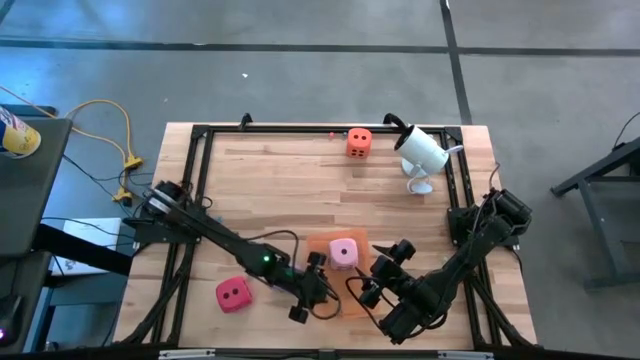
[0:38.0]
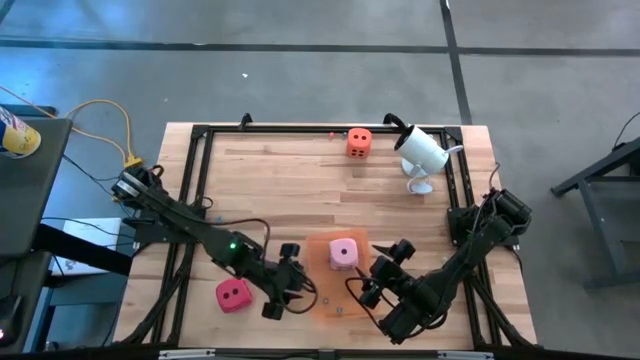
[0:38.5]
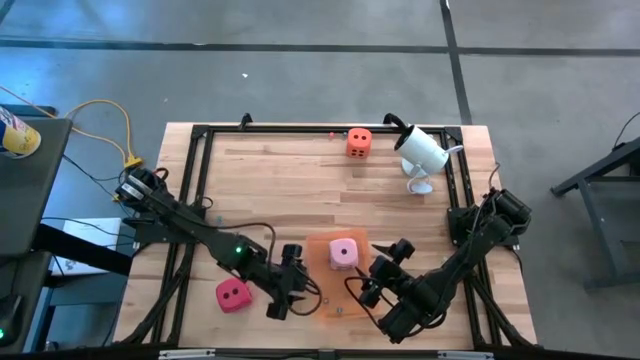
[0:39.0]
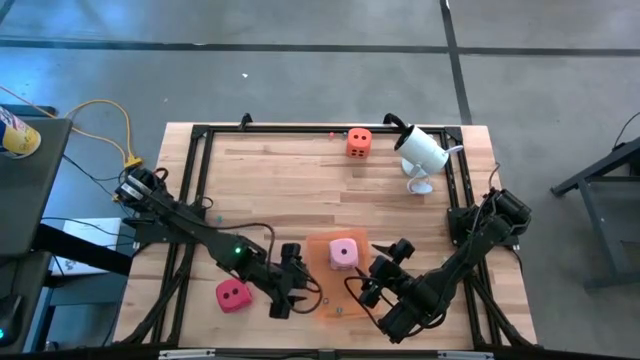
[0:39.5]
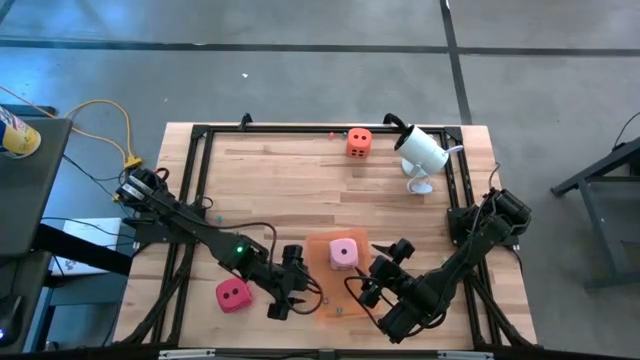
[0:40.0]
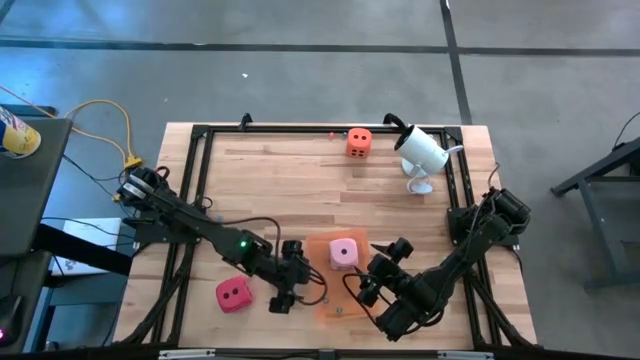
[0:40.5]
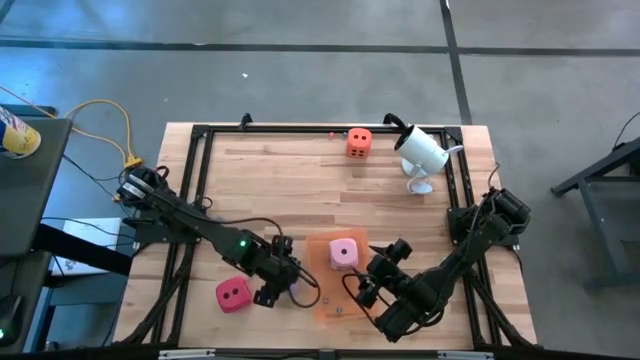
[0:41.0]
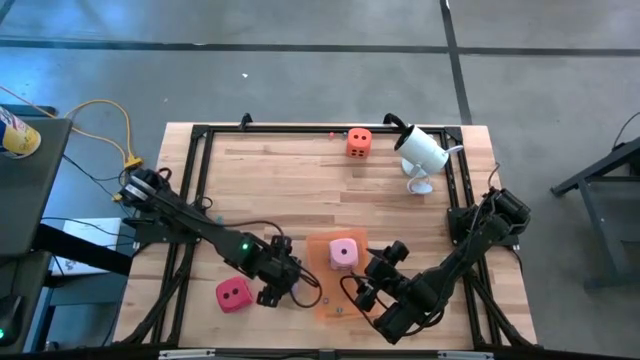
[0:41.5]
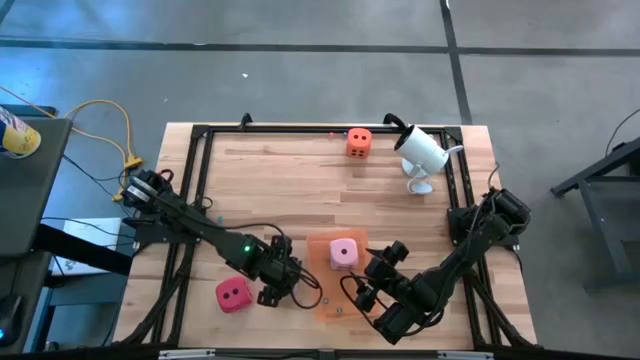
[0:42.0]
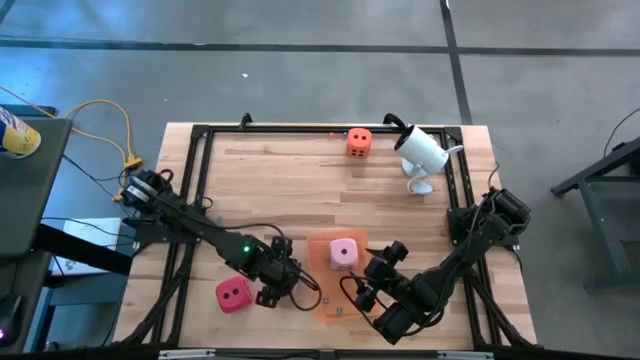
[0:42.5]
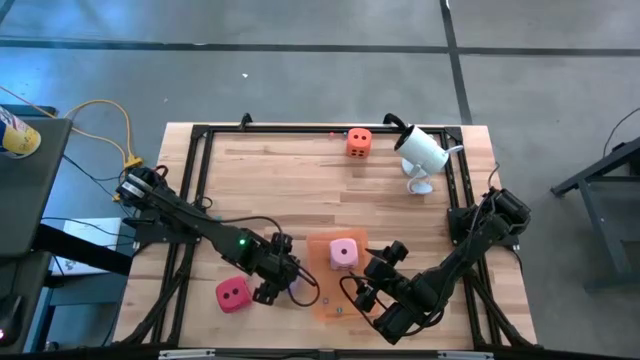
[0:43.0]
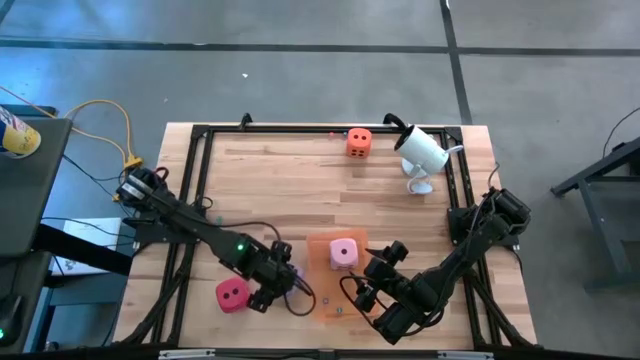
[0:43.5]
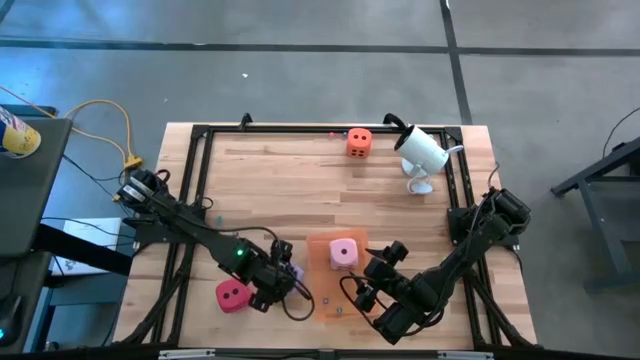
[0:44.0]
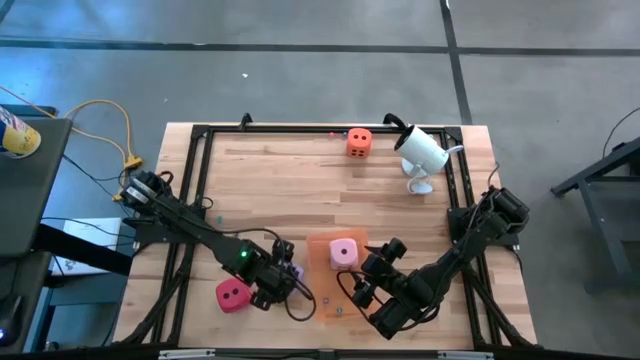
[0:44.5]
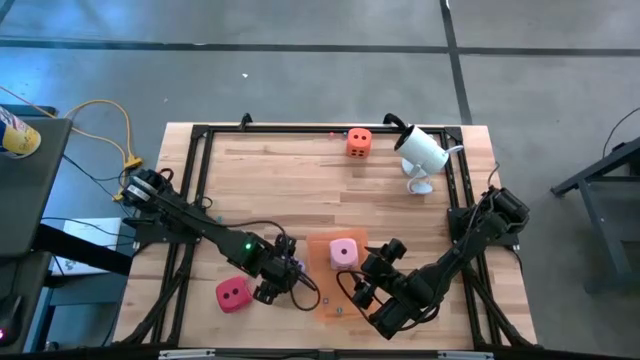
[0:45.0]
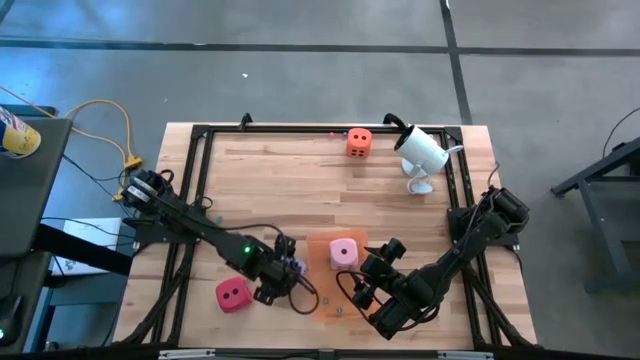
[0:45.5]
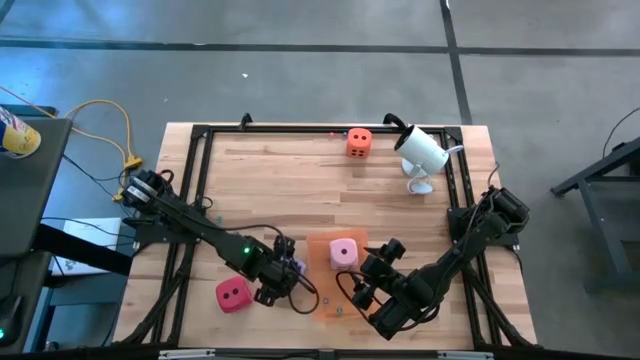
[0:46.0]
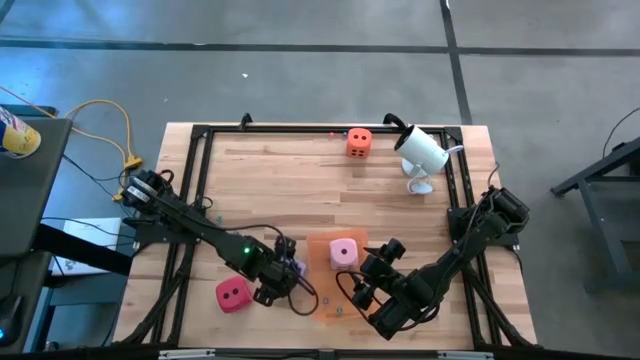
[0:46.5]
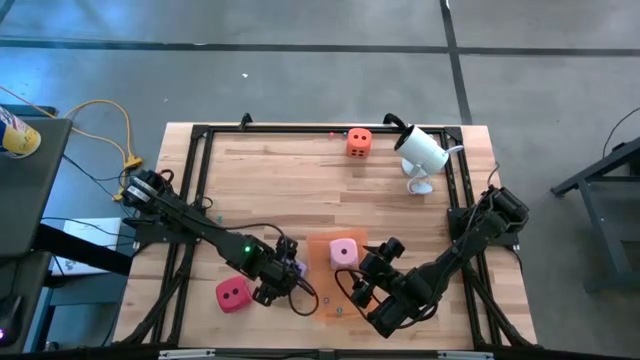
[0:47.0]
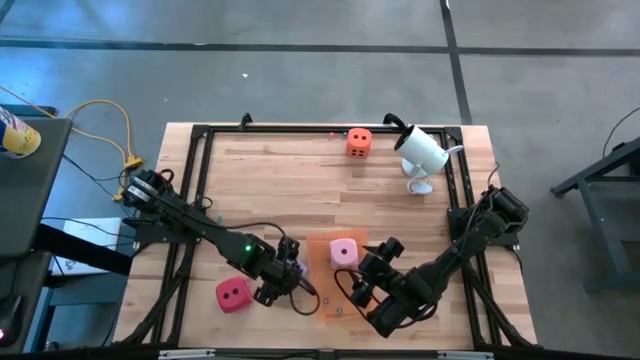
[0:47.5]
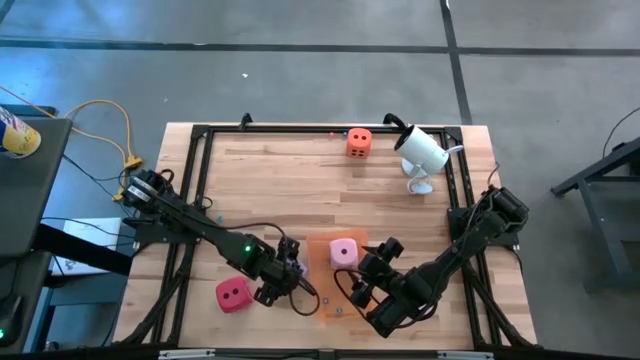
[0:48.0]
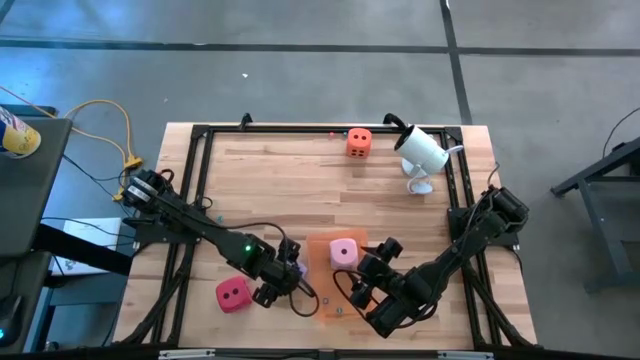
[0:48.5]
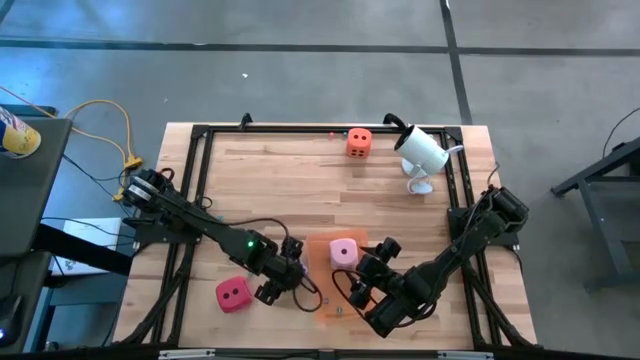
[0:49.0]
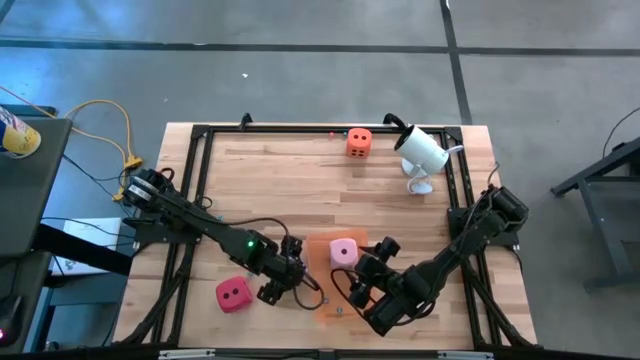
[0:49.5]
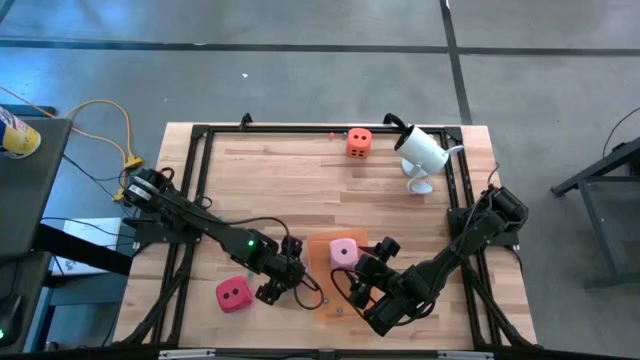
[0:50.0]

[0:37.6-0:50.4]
Task: Pick & Place Dice
Put the large purple dice into the orange bin

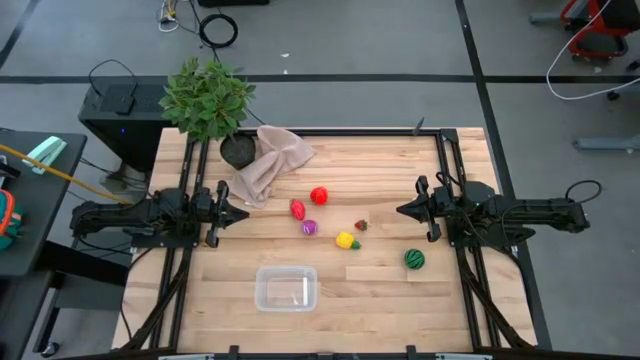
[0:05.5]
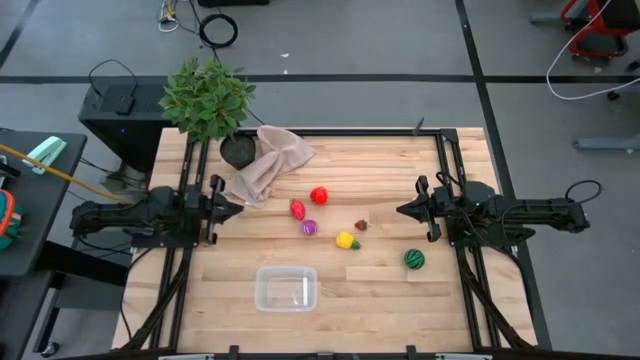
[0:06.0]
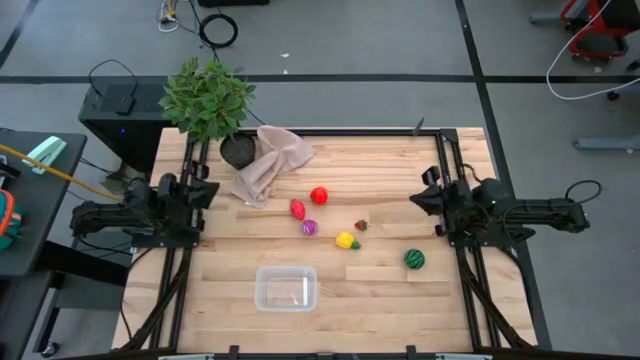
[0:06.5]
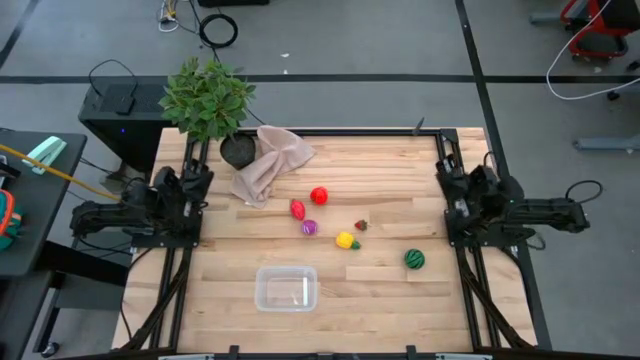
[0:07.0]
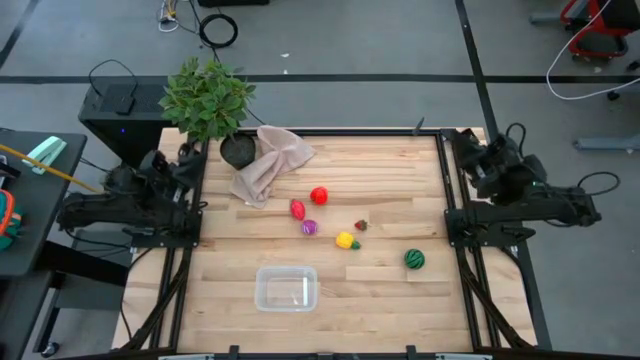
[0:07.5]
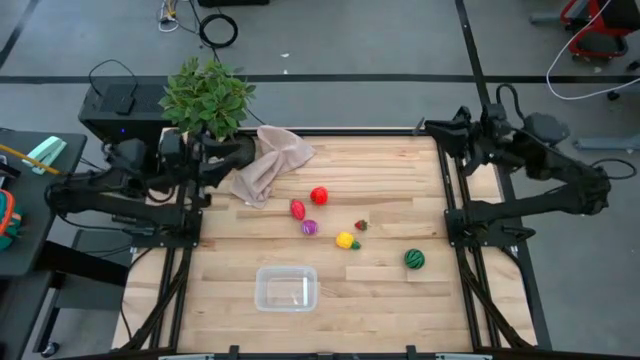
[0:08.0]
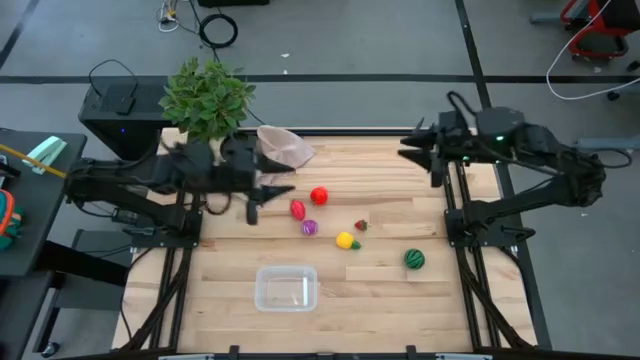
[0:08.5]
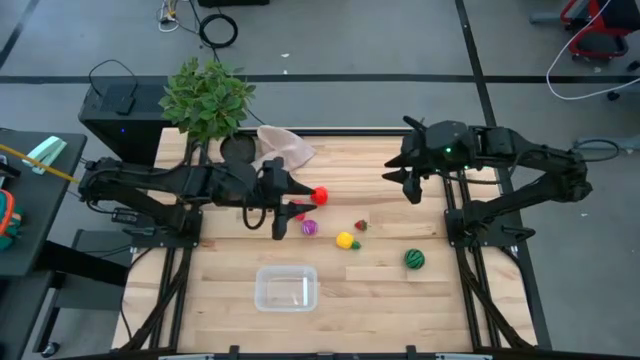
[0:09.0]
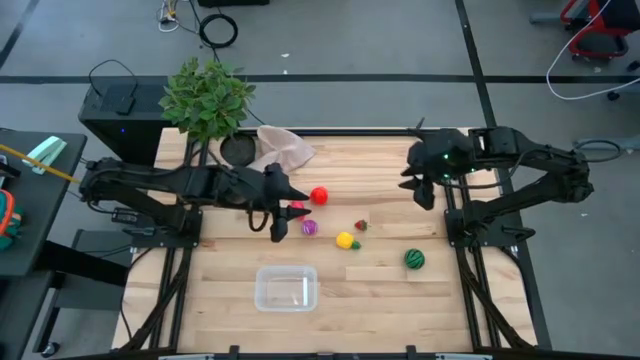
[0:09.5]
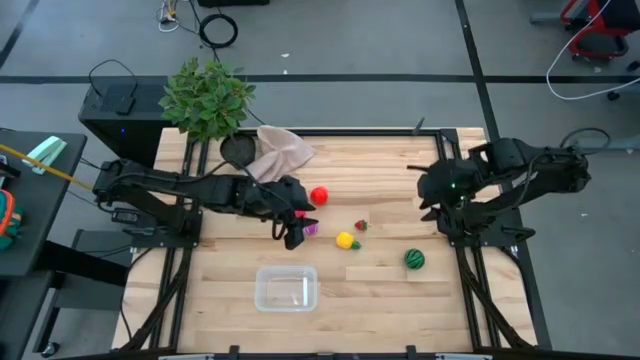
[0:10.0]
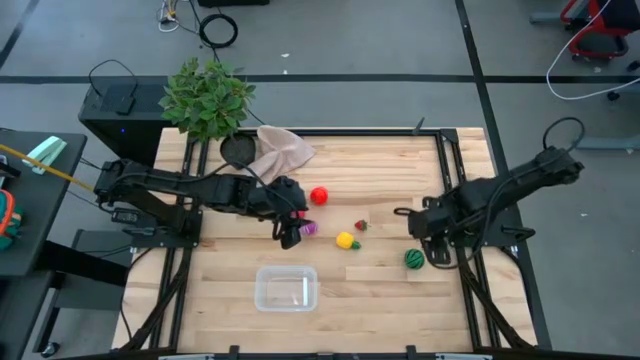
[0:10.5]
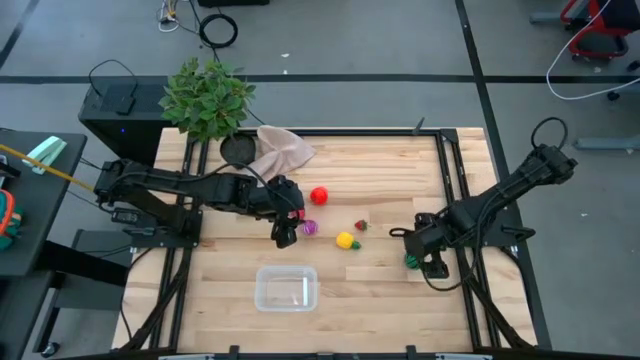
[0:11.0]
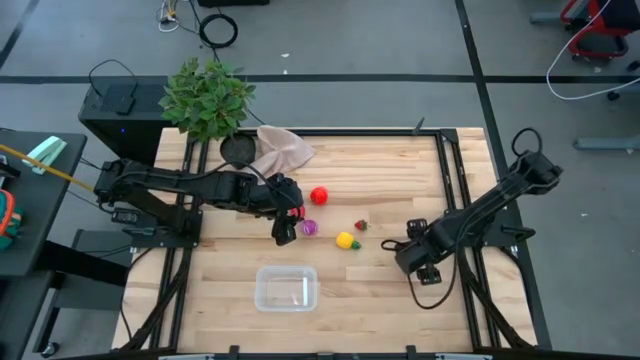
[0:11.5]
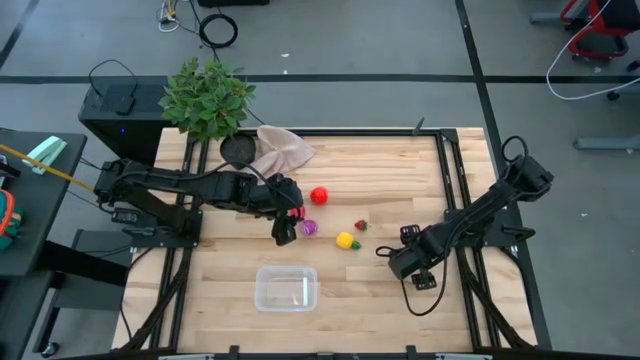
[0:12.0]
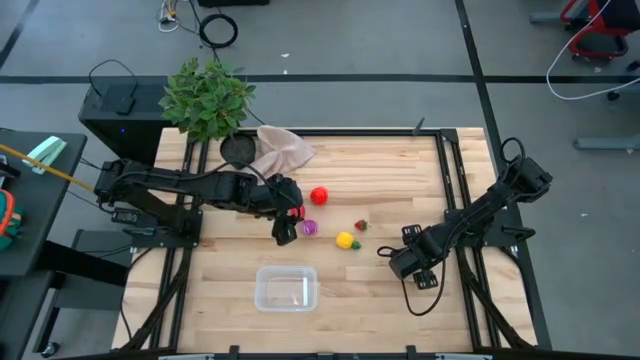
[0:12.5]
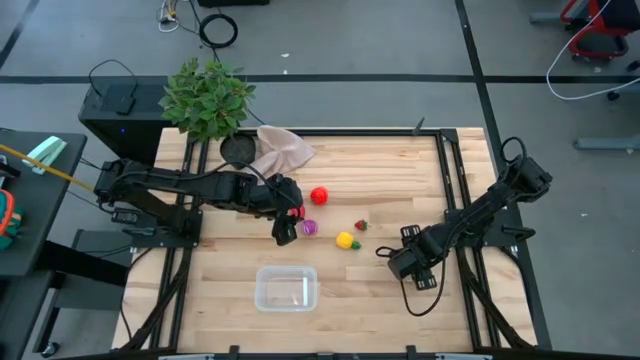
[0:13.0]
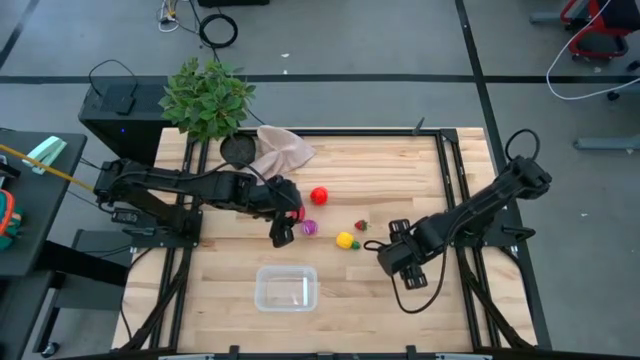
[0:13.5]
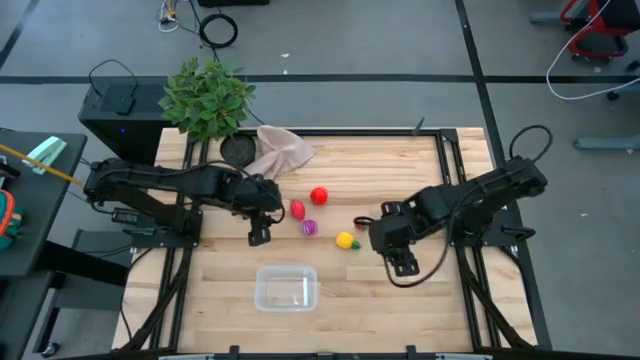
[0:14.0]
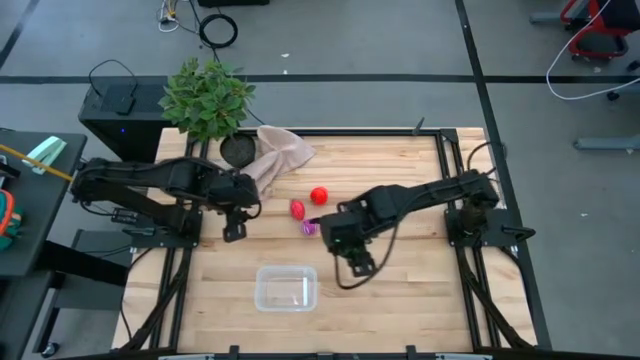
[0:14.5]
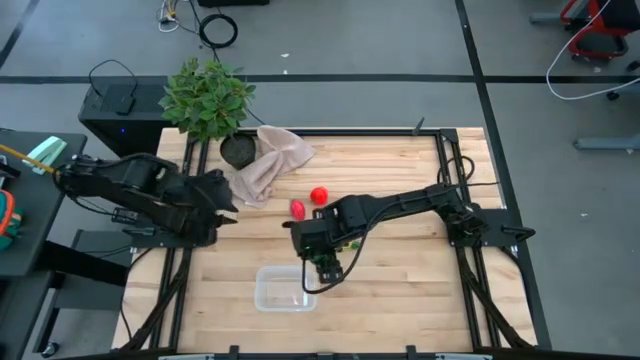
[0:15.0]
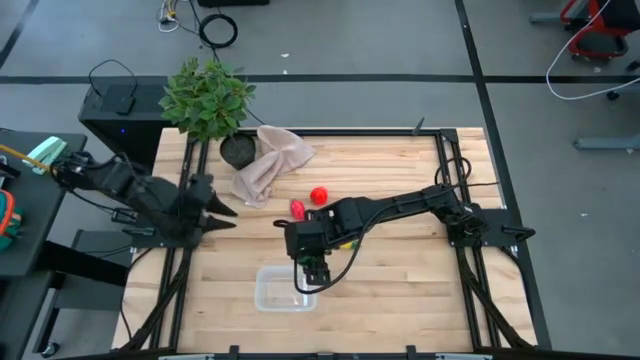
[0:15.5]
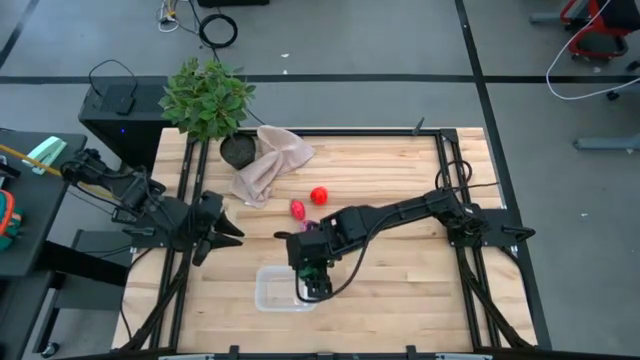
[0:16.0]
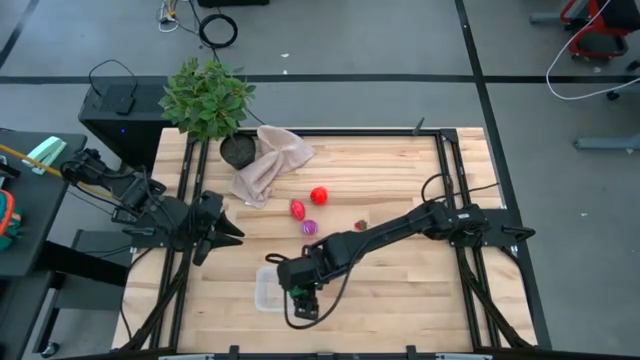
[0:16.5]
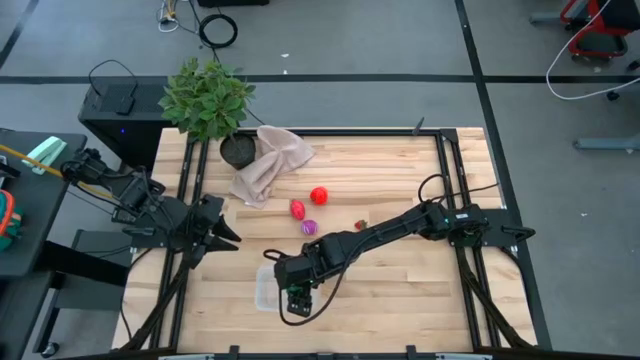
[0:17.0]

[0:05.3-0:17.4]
Task: Pick and placing Produce into tupperware
Put the watermelon into the transparent bin
